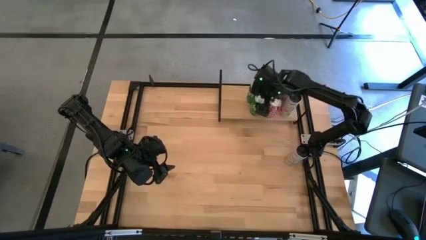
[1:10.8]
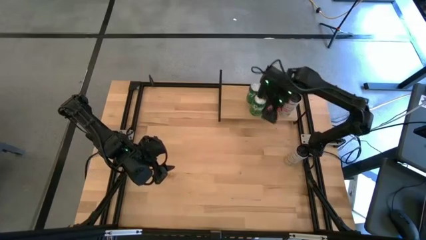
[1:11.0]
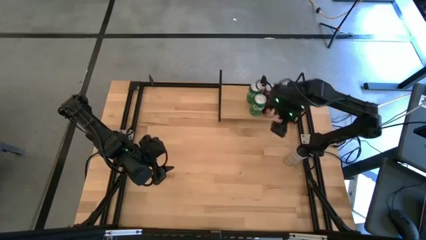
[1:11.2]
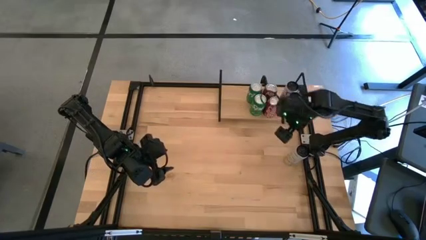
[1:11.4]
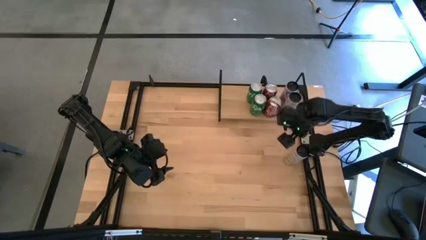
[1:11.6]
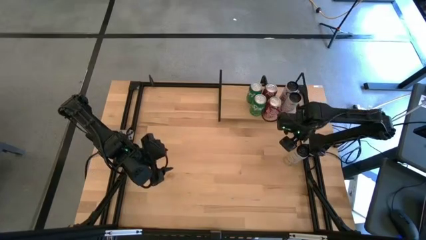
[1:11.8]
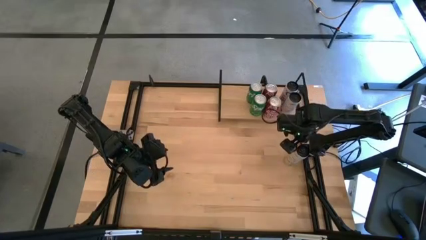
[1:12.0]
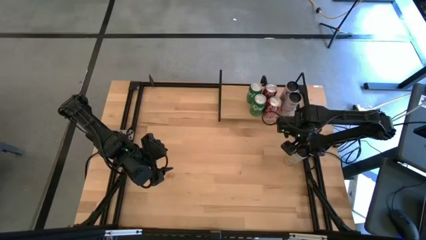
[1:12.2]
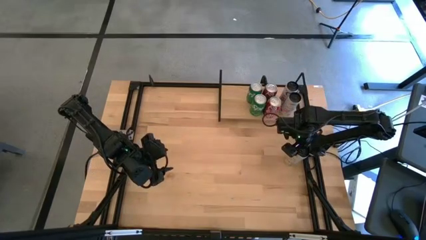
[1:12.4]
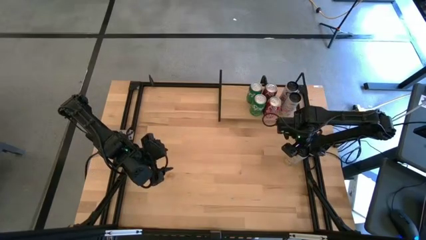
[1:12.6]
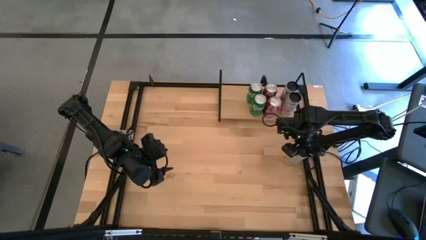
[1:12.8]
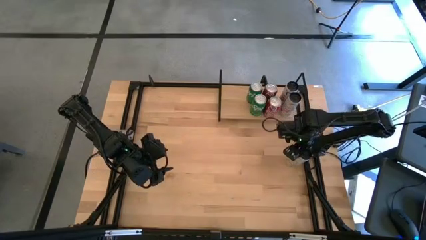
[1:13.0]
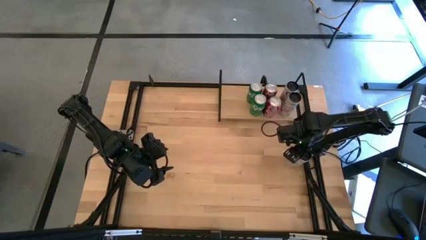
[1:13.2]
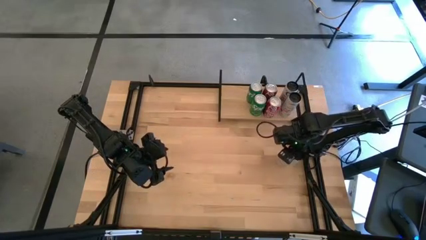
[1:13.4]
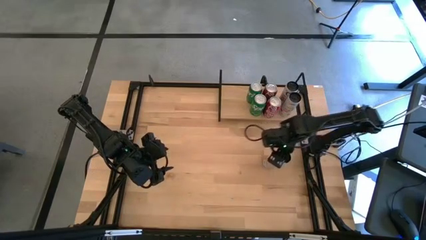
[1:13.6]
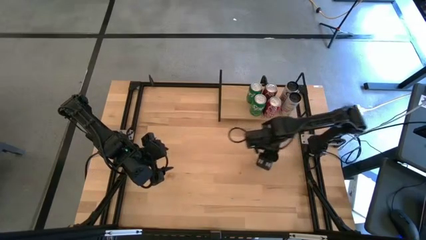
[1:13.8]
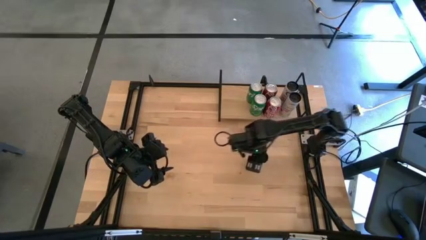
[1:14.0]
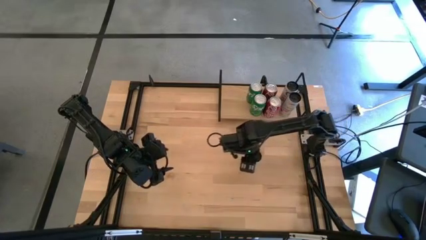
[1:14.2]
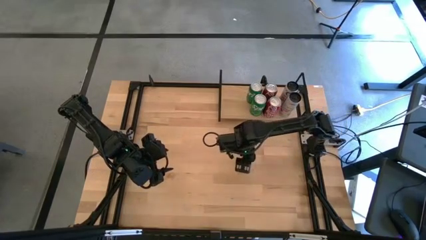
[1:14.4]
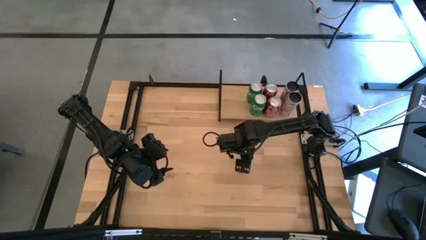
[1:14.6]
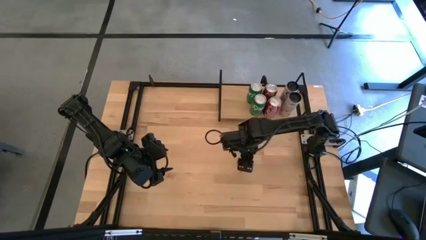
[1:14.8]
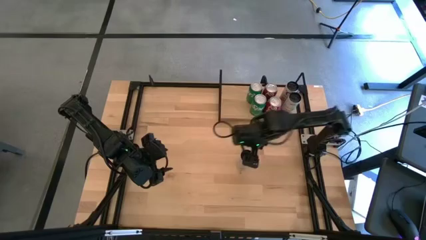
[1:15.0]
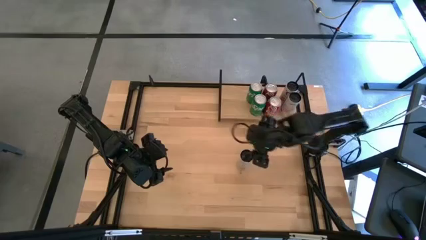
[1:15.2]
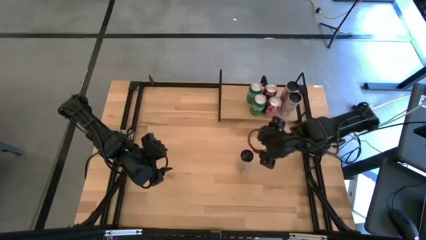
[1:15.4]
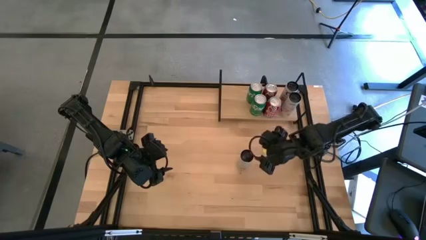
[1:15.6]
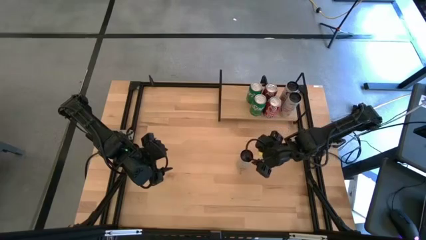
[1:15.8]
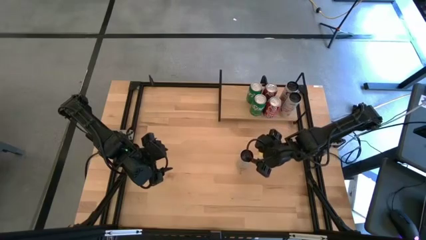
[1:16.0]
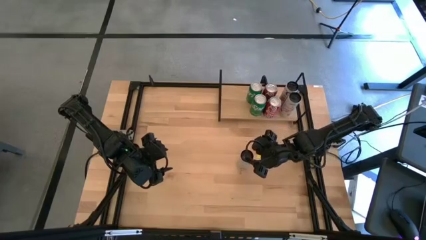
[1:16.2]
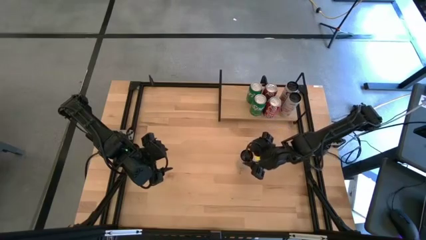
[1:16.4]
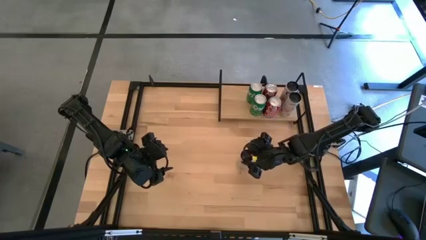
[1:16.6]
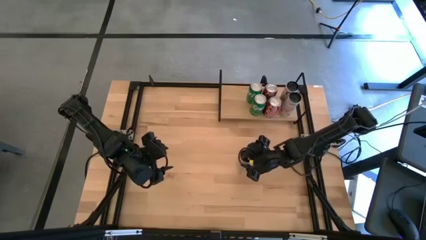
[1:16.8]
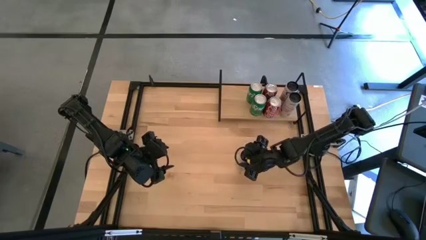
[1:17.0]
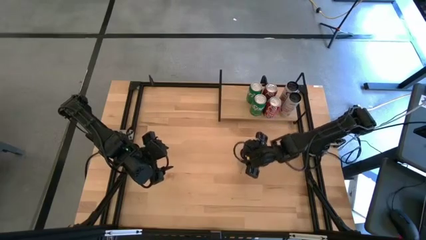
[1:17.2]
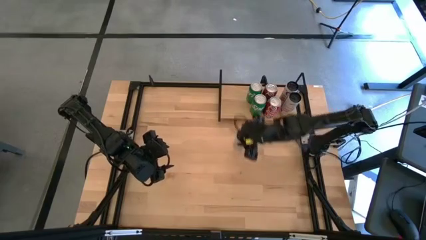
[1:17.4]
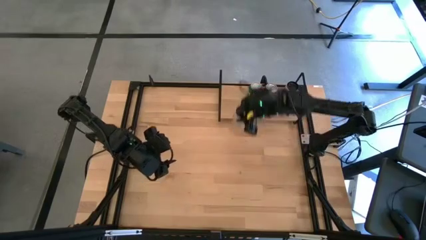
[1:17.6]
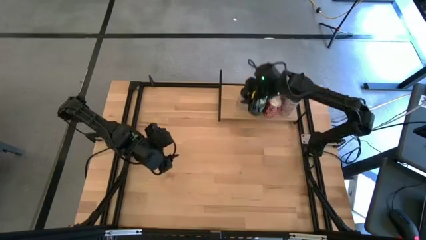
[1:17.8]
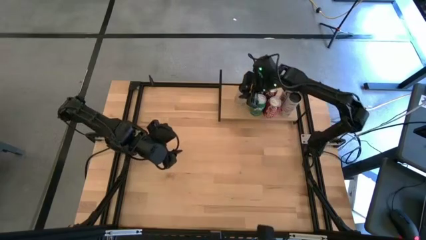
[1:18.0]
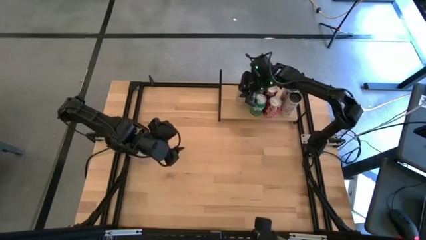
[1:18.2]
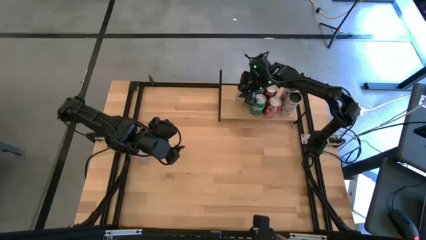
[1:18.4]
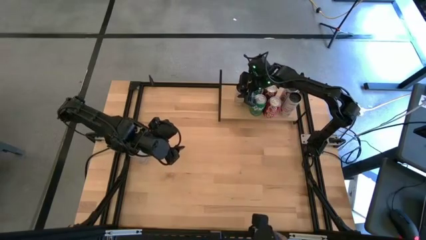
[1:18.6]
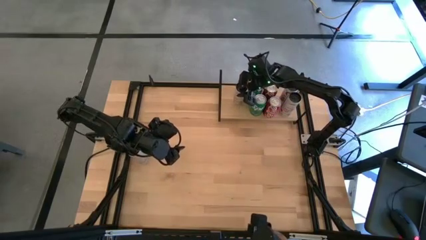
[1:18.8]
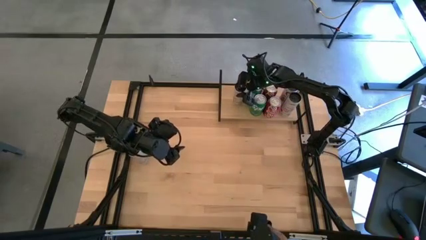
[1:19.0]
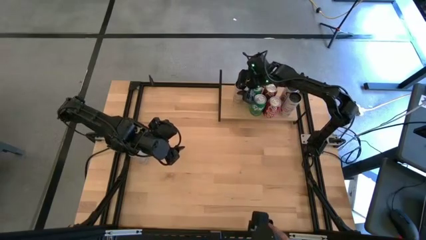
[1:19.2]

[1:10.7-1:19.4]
Task: Place canned beverage on shelf
Put the white yellow soda can on the shelf

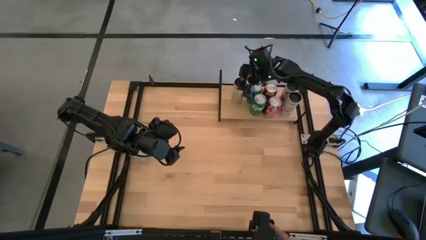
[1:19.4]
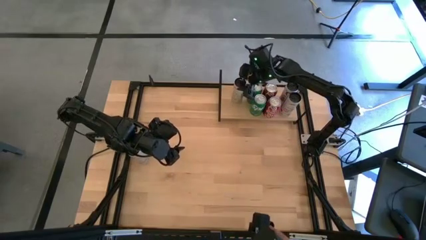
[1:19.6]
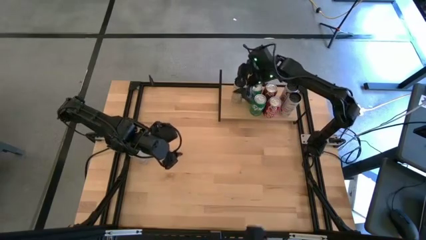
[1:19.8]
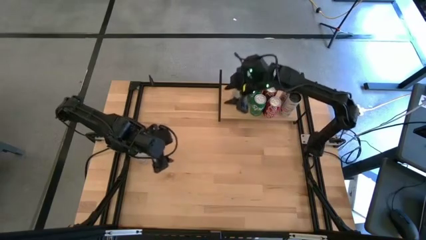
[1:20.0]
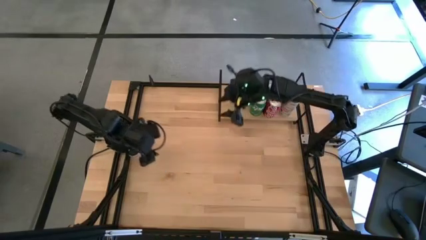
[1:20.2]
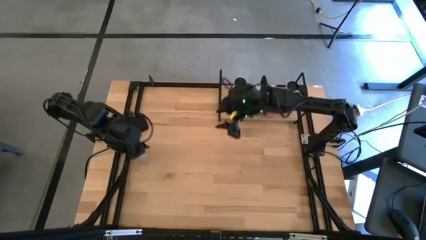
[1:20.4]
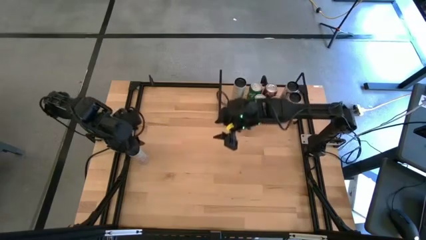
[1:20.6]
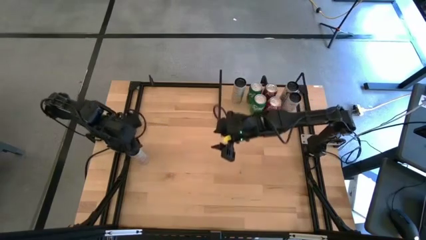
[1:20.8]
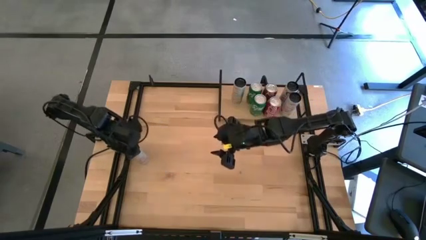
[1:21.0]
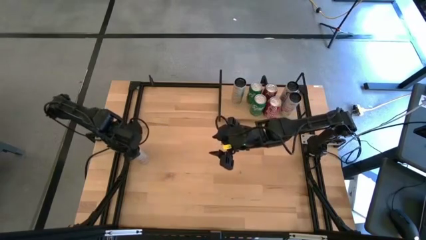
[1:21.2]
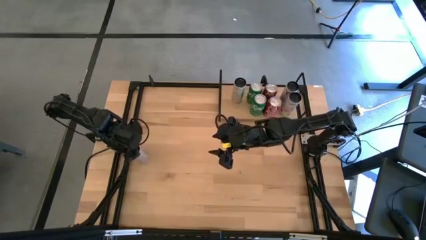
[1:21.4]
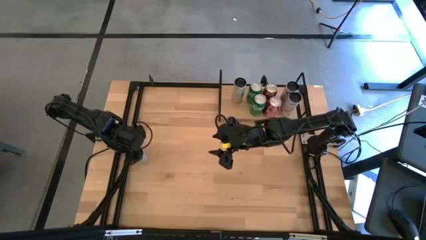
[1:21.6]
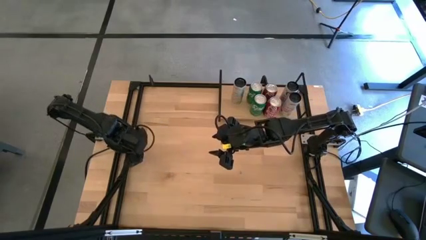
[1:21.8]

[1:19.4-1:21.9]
Put the top white yellow soda can on the shelf aligned with the other white yellow soda can

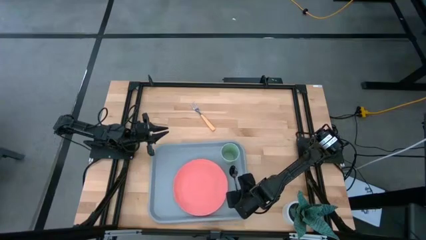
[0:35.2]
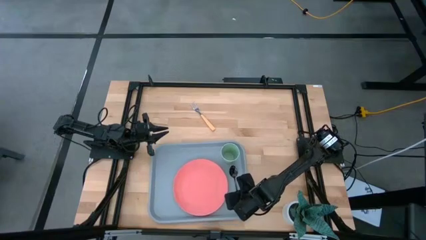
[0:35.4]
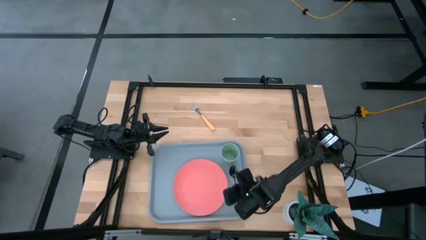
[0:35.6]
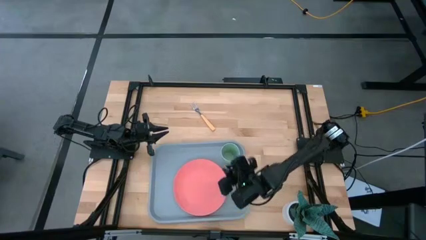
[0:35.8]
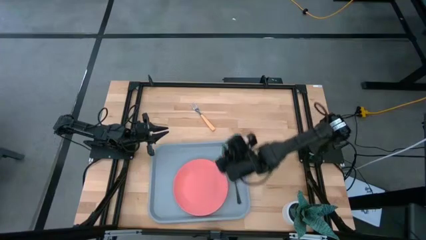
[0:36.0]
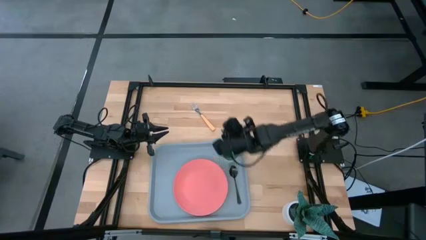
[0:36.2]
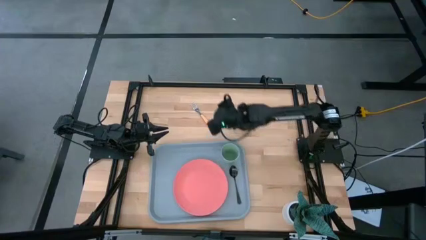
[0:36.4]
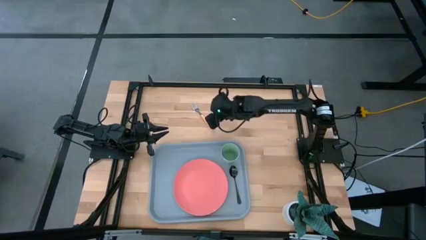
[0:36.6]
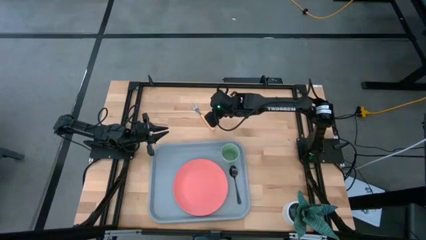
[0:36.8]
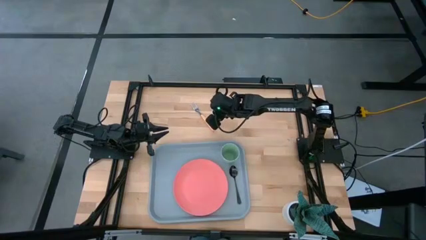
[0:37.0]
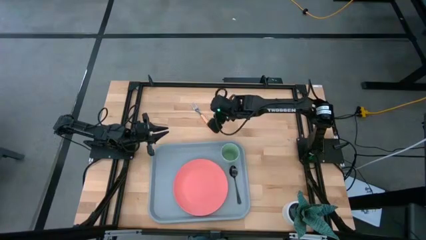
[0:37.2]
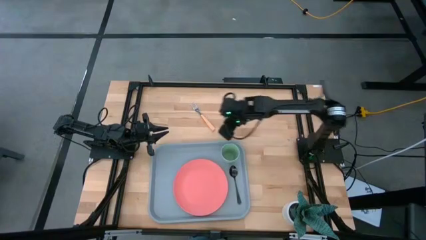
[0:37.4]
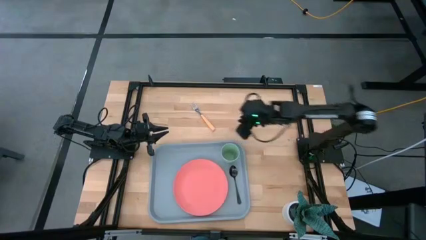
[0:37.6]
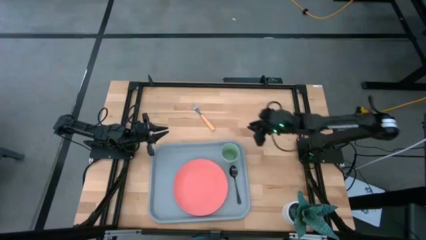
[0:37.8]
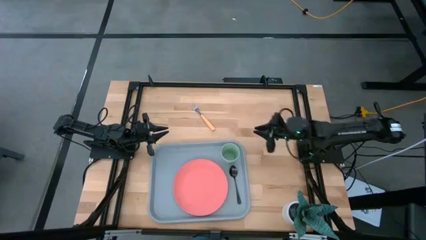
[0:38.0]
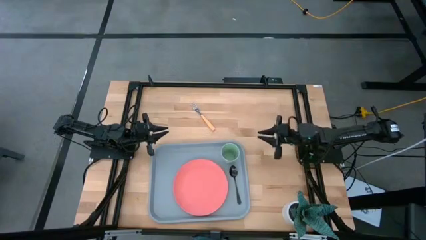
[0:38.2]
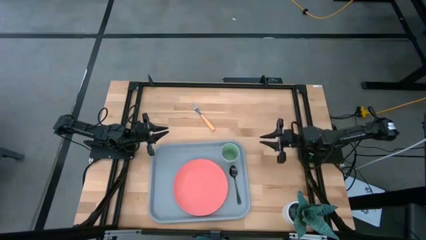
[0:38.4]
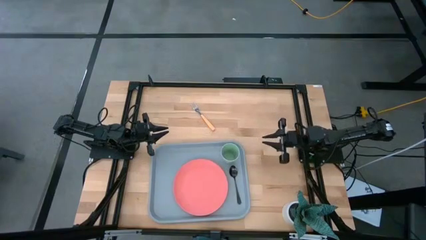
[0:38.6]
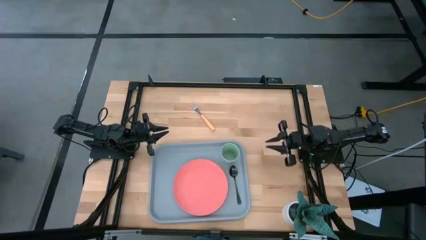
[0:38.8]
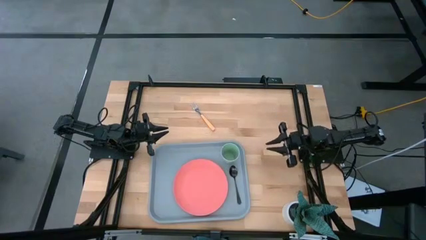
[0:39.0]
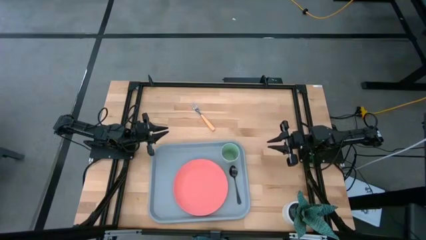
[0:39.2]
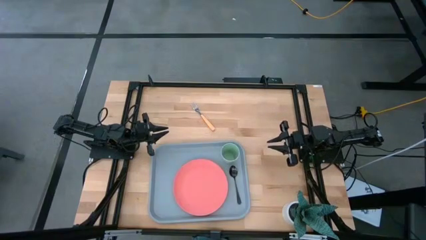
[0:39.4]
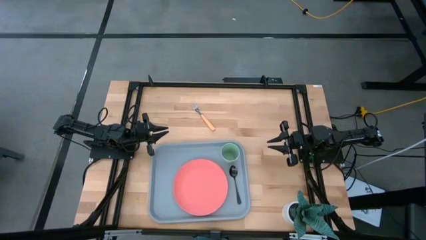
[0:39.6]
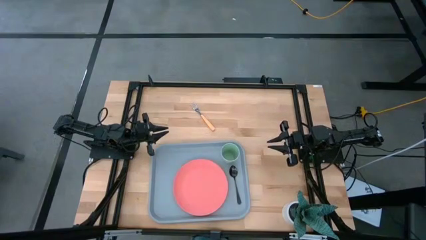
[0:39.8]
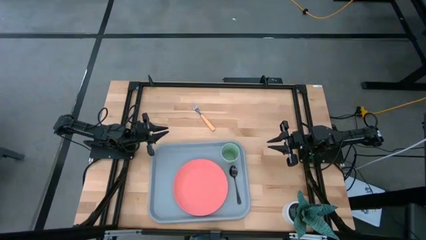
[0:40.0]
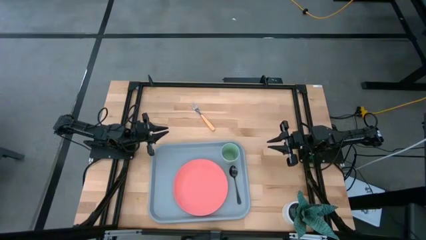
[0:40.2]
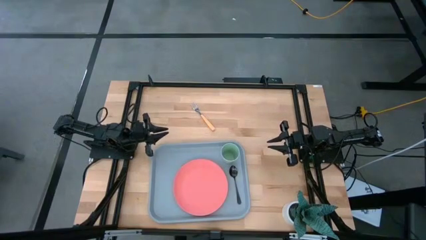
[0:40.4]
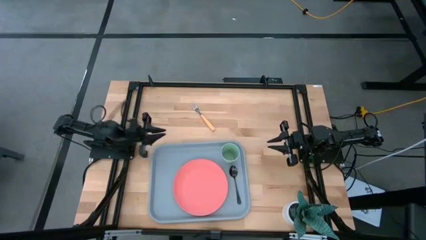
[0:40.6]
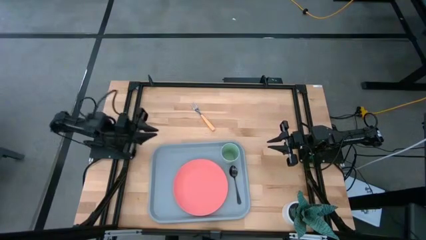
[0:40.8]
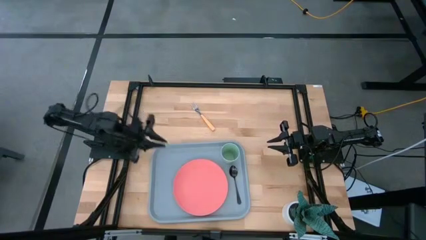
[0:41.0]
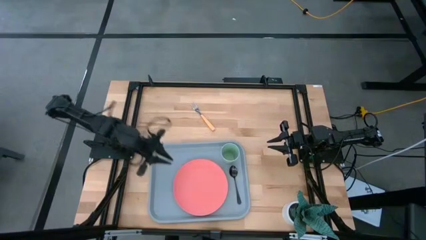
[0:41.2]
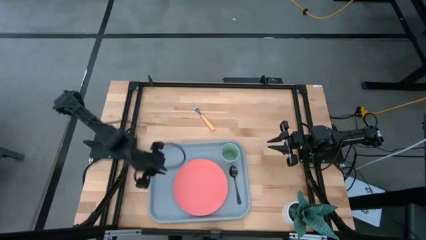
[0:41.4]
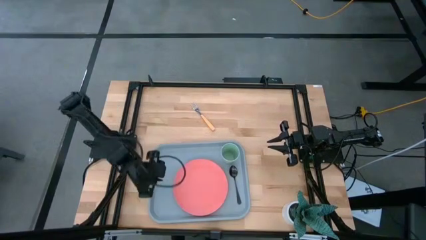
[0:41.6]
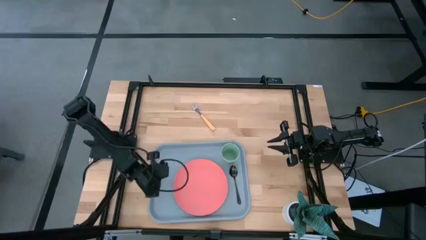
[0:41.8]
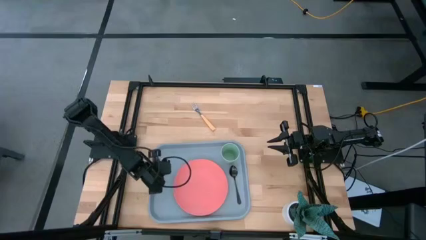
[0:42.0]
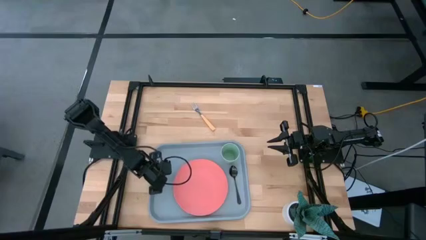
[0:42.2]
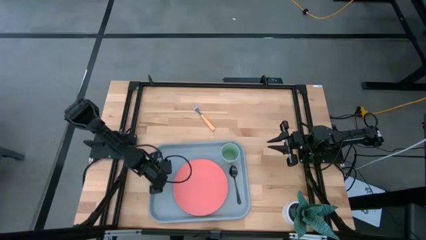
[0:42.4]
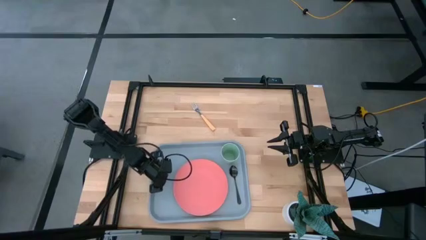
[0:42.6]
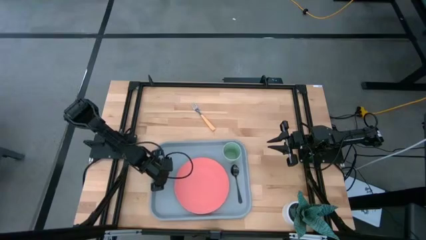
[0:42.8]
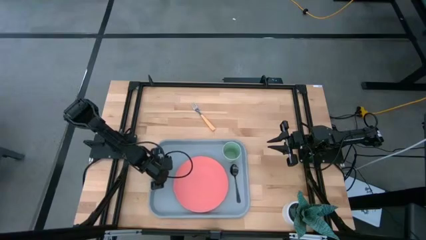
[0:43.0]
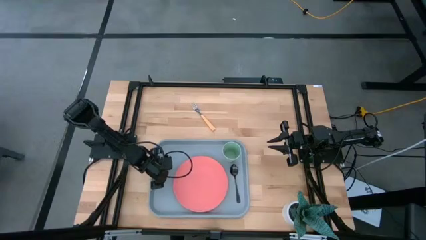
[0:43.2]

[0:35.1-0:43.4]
Task: Pick and place plate/cup/fork/spoon on tray
Adjust the gray serving tray
